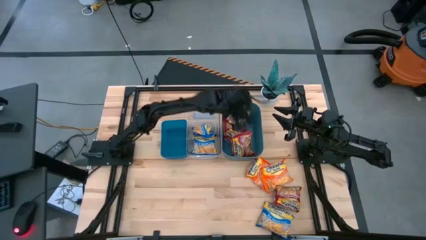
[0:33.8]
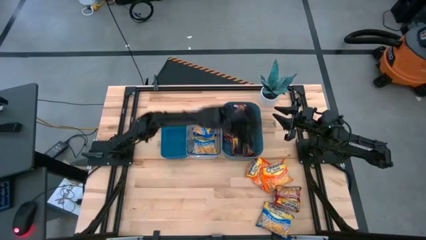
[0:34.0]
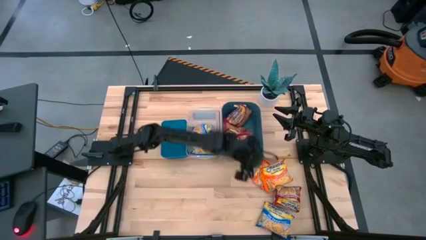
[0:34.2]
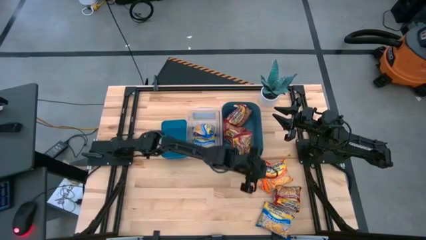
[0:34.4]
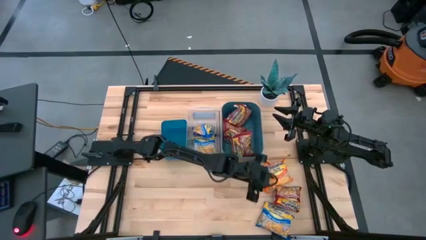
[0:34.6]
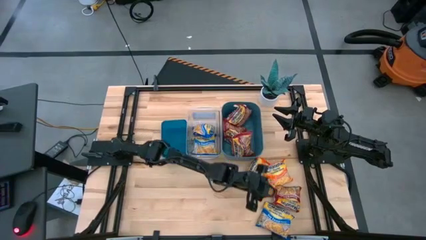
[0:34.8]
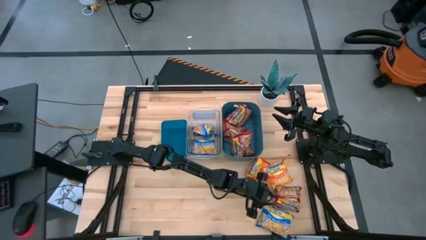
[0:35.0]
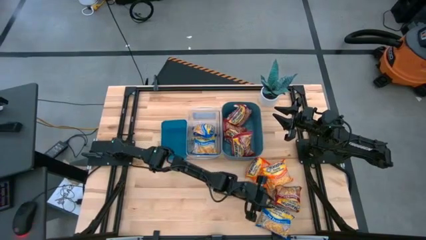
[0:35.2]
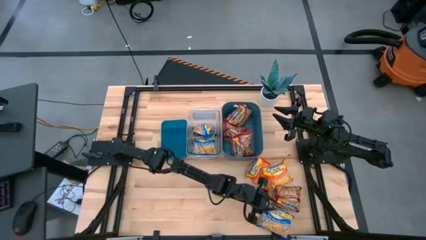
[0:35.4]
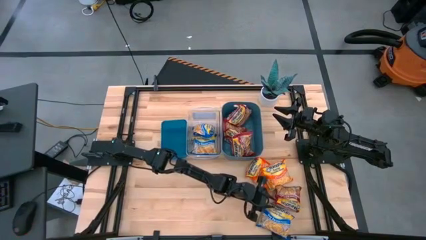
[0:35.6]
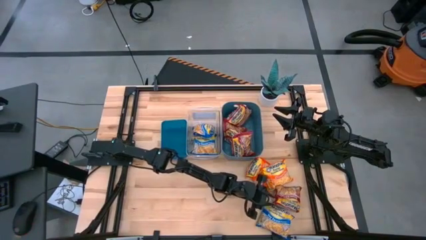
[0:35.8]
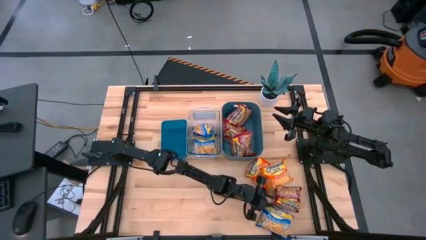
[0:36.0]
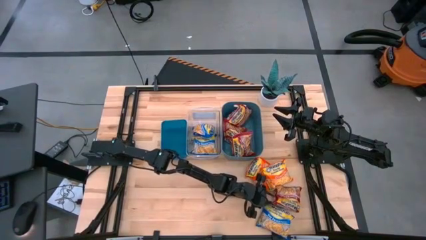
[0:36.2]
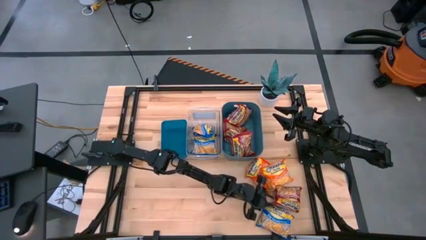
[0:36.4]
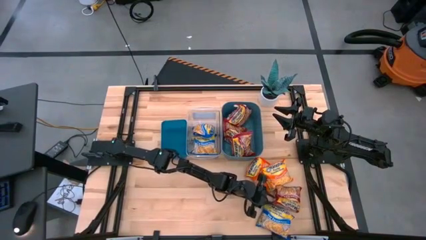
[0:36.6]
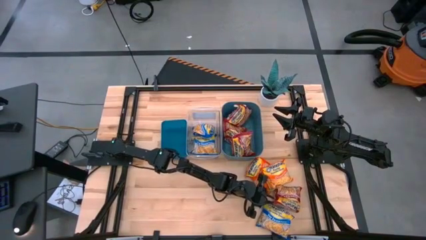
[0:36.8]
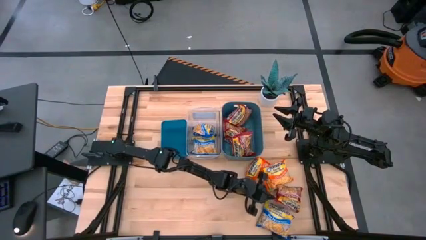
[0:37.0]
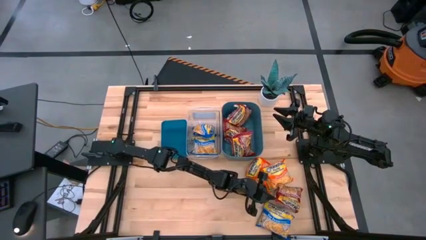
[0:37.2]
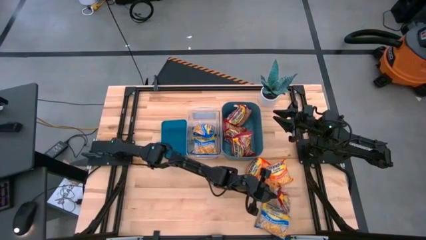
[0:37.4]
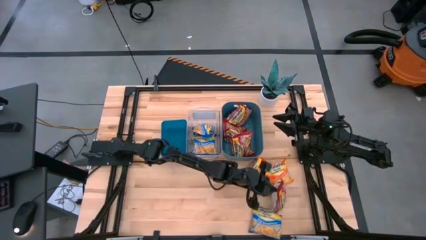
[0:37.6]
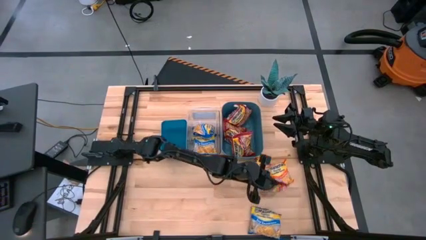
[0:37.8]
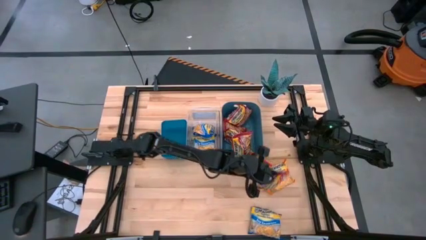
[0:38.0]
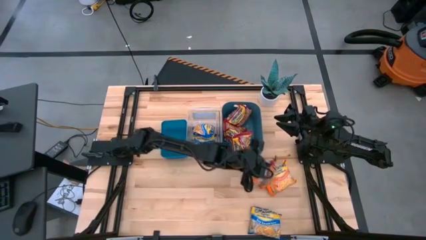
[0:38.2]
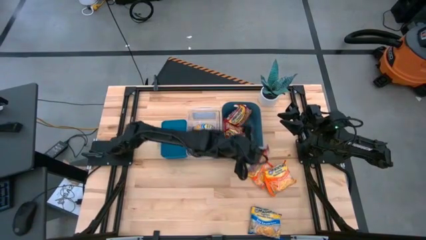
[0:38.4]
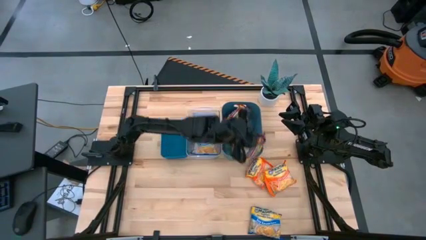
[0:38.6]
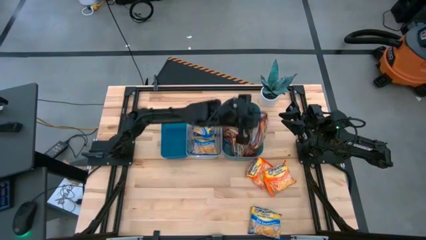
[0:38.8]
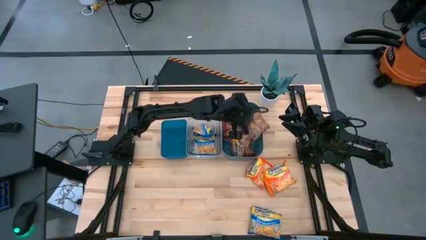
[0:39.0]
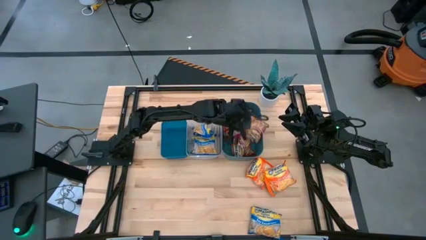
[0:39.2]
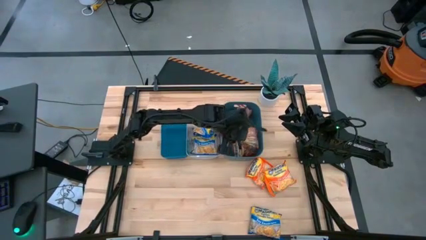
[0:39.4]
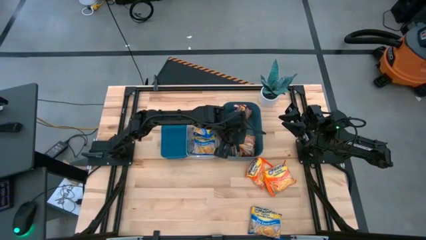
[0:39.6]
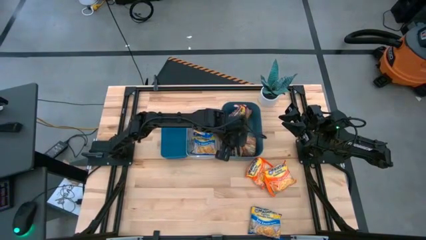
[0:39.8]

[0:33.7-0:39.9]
Task: Sort Maruchan noodles
Put the red noodle pack into the right blue bin

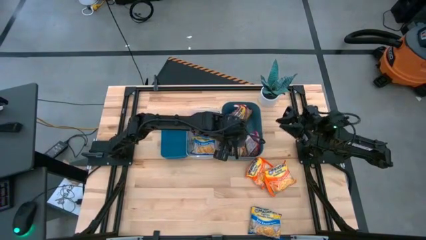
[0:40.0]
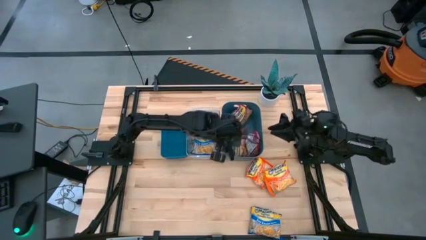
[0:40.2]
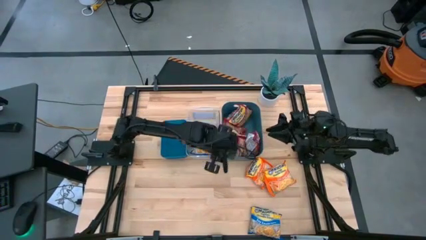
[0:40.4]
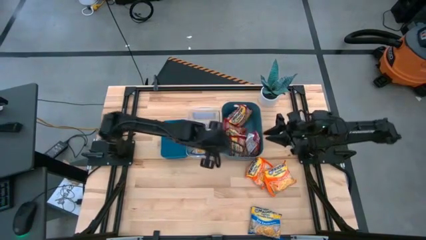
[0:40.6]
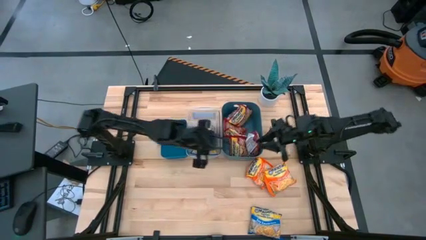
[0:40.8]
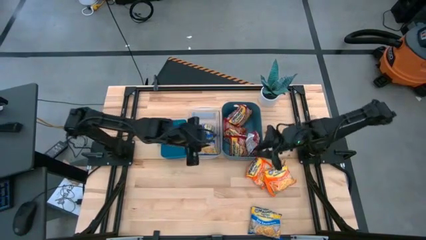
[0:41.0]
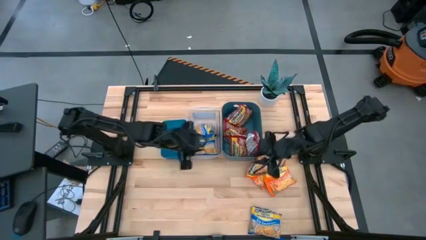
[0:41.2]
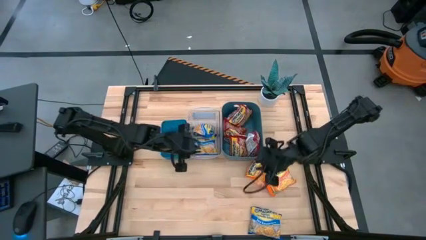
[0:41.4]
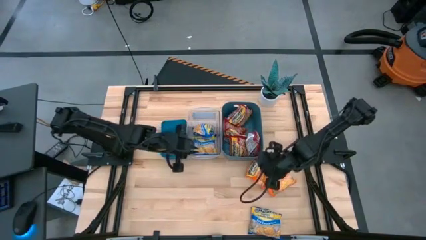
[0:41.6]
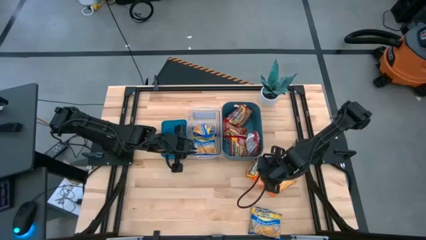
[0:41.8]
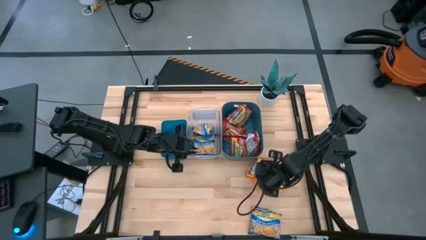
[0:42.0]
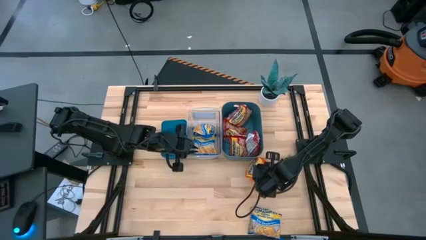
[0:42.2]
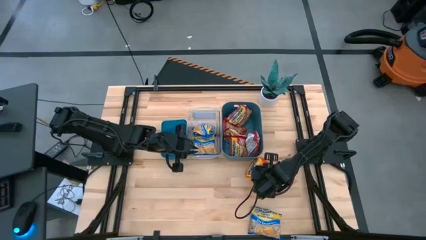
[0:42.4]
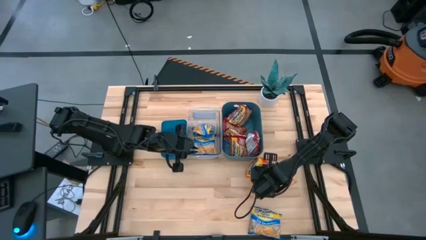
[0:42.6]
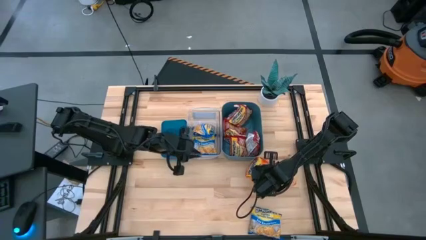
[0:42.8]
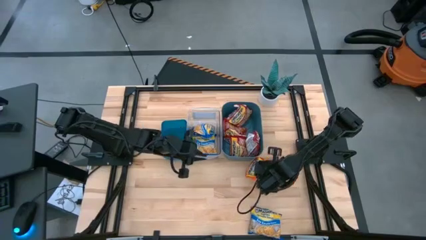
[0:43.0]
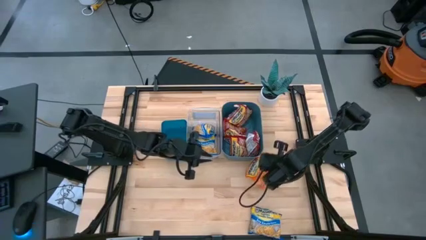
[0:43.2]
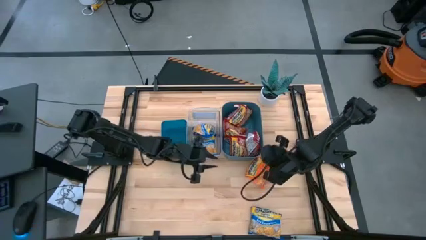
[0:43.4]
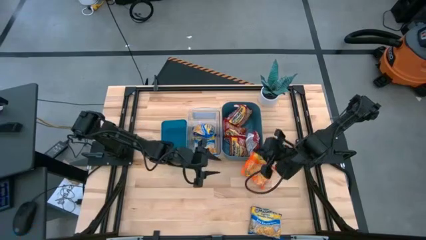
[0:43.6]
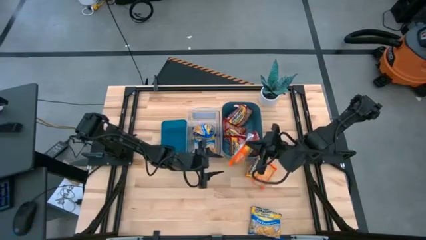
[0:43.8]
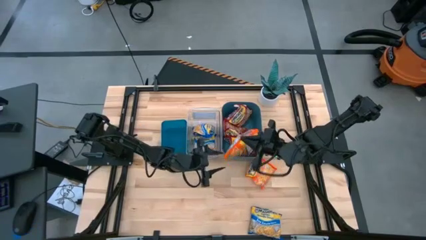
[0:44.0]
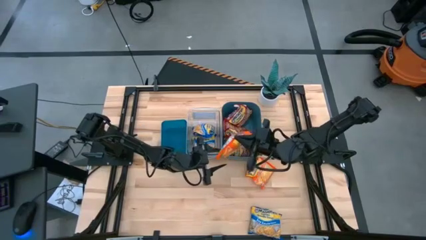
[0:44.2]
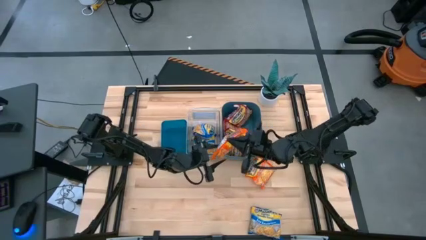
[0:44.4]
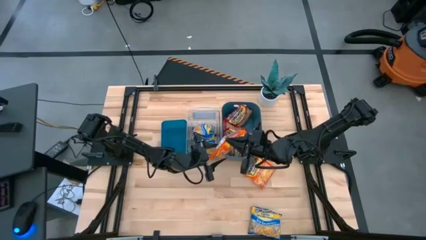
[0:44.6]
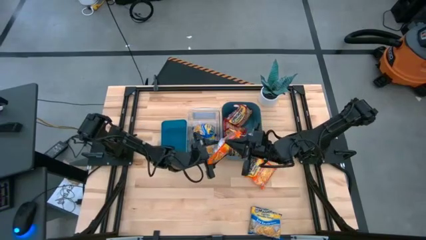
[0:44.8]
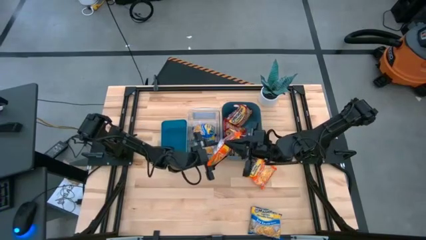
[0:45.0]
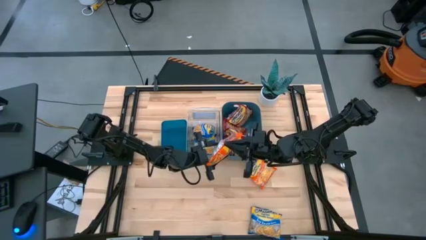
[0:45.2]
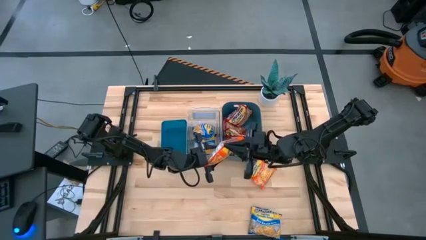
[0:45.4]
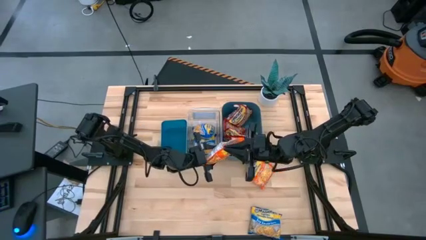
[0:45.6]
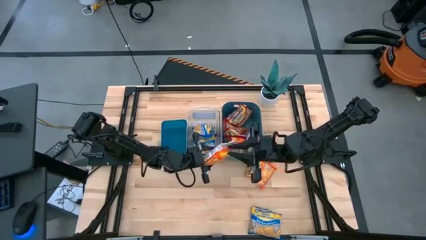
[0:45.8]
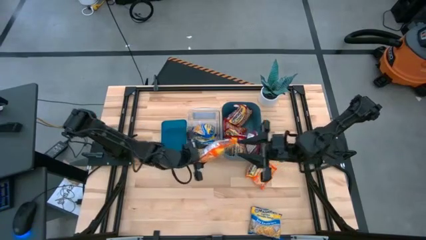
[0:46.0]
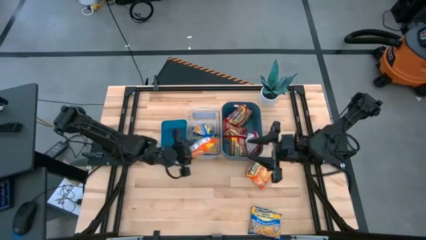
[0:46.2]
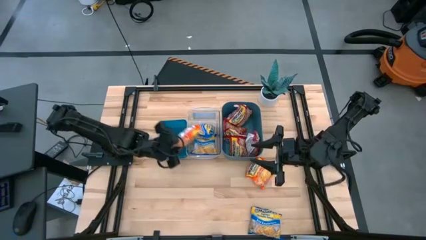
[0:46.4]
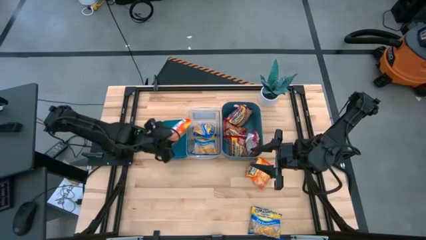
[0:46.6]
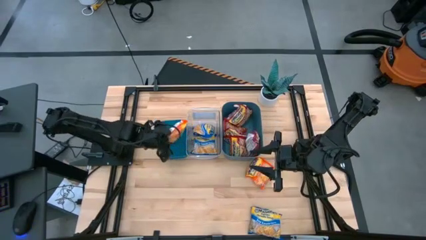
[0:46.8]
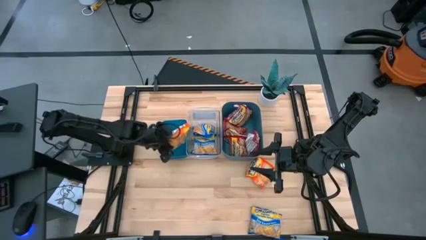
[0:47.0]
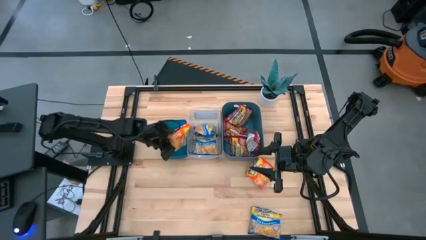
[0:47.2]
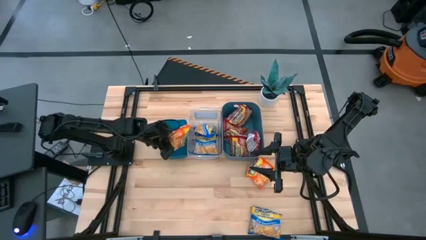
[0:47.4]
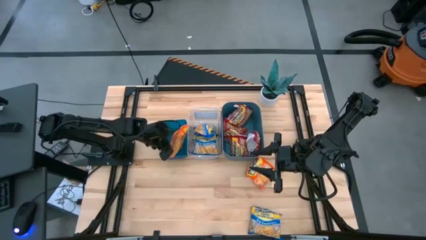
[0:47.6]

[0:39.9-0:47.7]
Put the orange noodle pack into the left blue bin

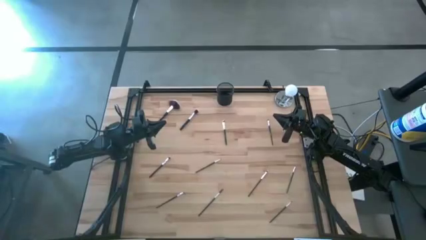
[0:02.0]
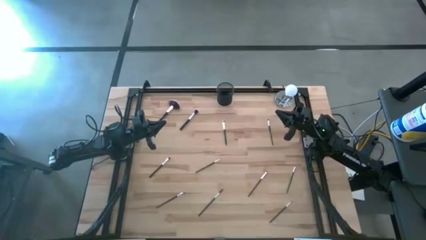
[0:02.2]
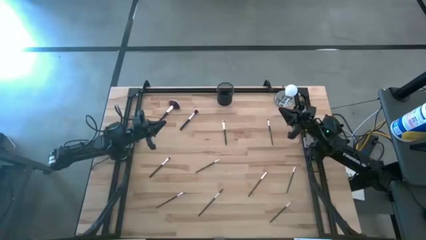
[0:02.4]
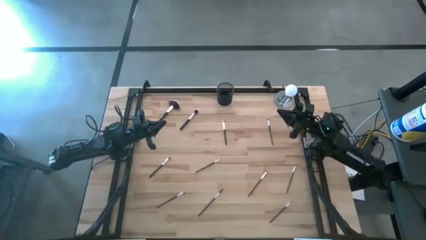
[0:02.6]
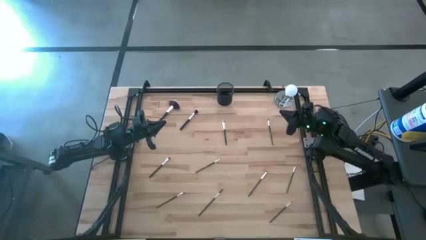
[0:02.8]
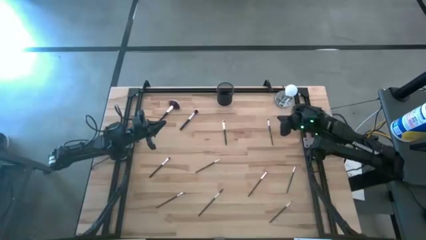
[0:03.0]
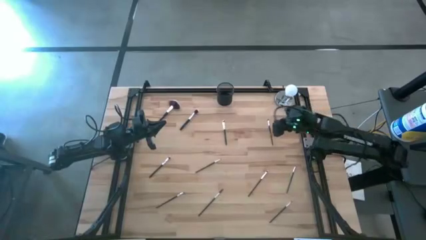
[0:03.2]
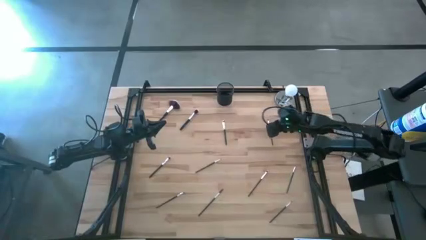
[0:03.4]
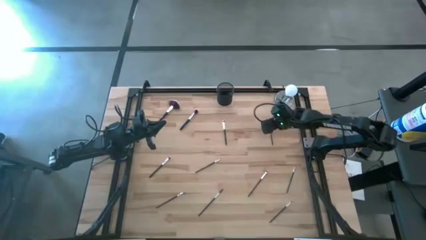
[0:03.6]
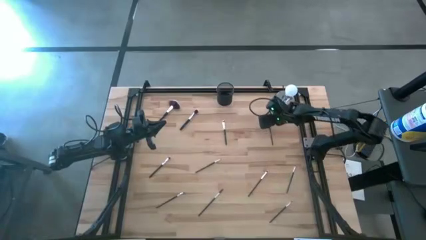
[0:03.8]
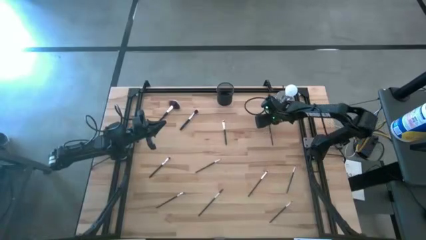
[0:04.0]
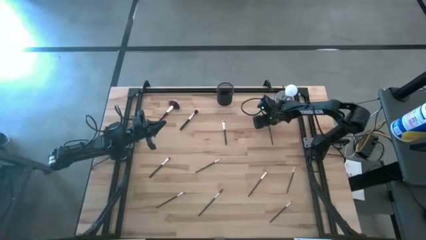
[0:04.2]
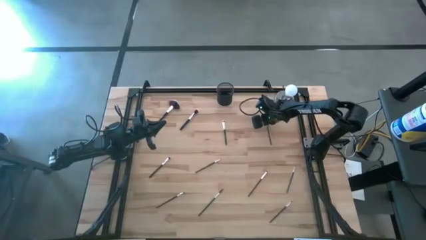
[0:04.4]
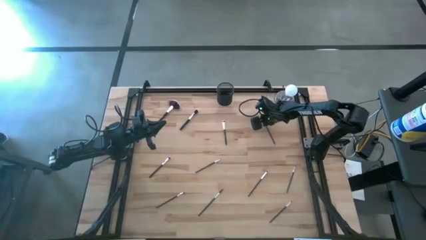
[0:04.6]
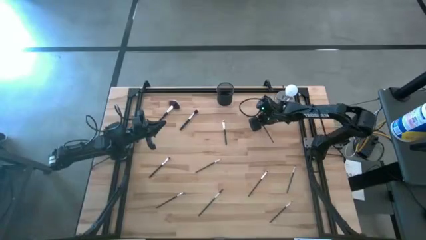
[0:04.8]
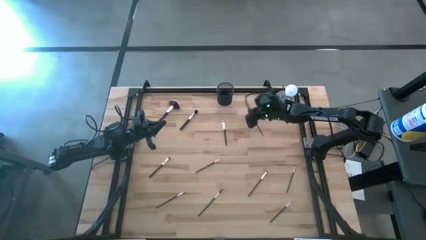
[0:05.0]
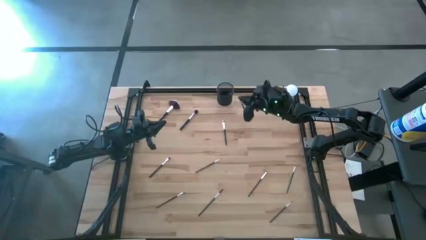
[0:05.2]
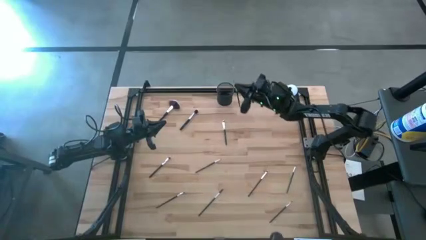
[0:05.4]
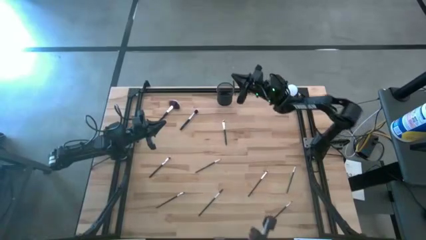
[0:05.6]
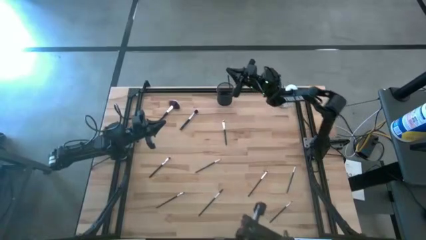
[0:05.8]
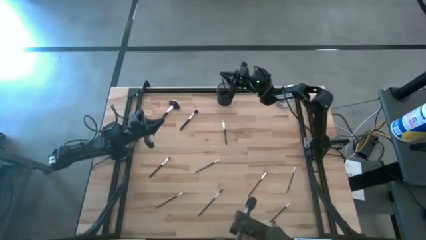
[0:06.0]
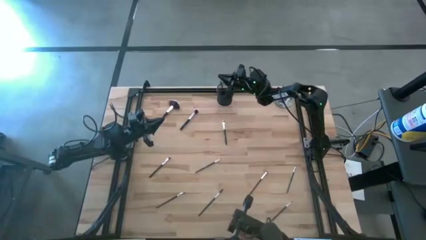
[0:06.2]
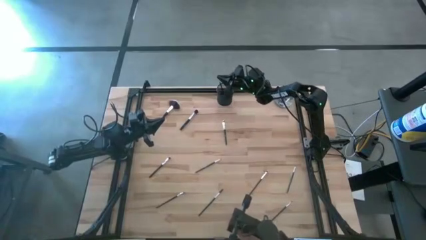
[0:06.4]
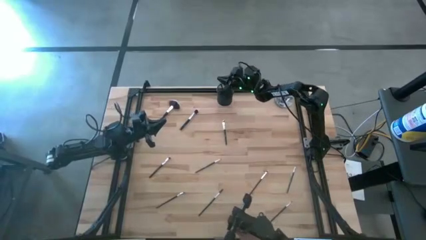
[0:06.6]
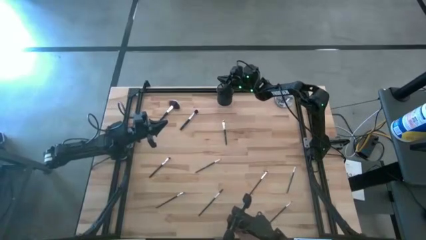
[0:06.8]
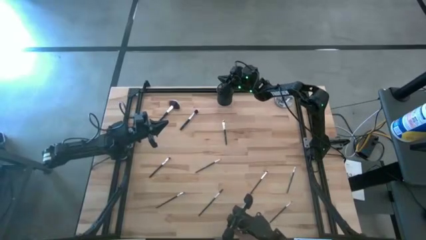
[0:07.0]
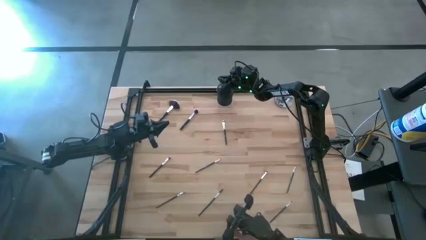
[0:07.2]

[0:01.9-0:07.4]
Task: Put items in baskets/containers
Put the black eyeshadow brush into the black pen holder
